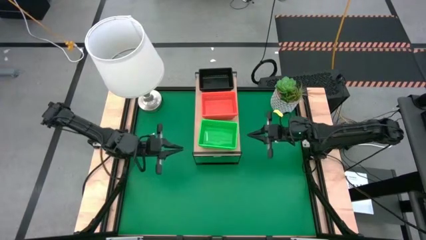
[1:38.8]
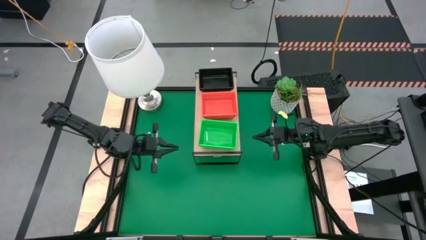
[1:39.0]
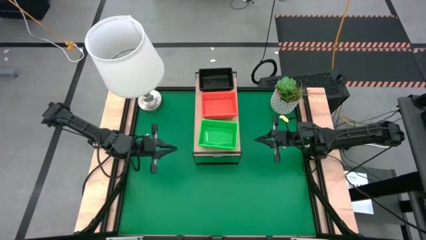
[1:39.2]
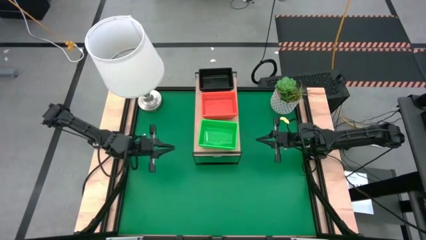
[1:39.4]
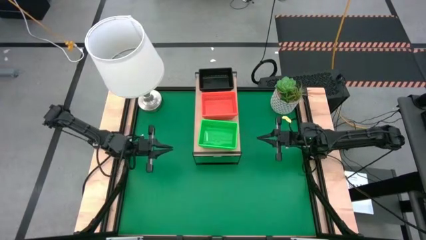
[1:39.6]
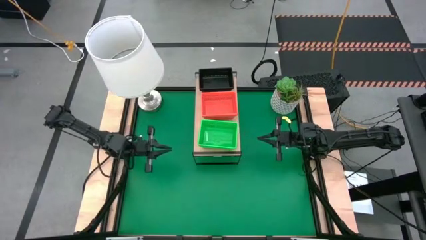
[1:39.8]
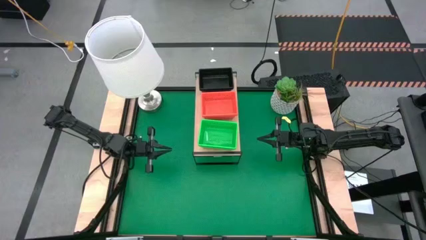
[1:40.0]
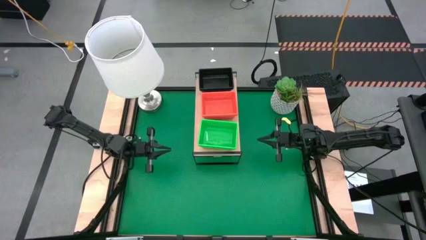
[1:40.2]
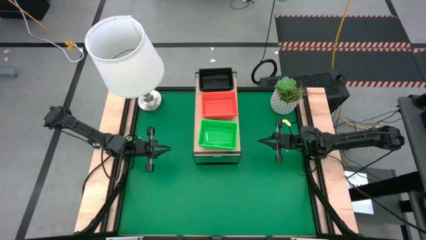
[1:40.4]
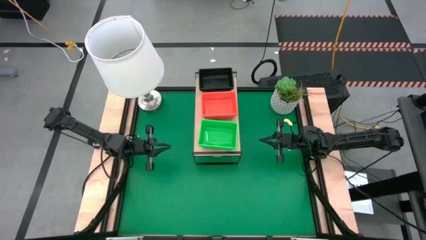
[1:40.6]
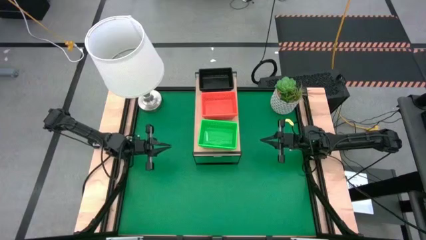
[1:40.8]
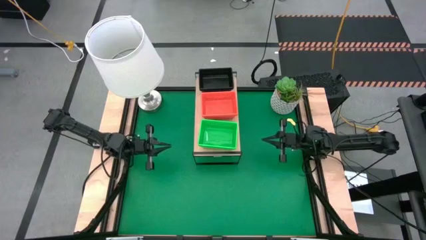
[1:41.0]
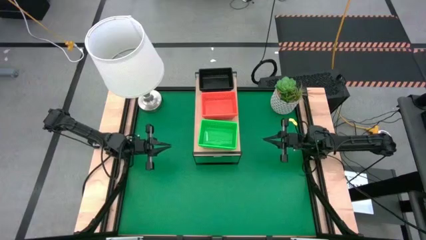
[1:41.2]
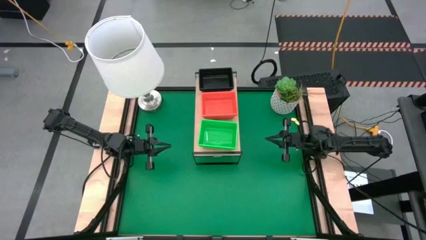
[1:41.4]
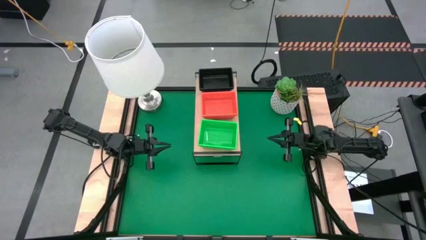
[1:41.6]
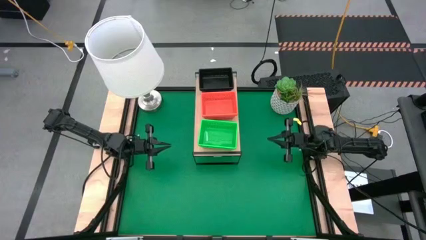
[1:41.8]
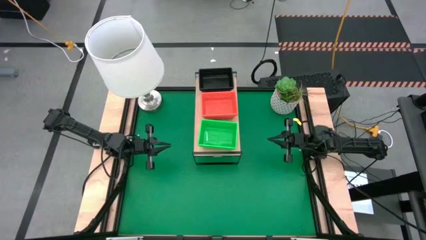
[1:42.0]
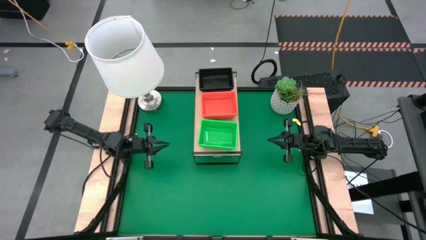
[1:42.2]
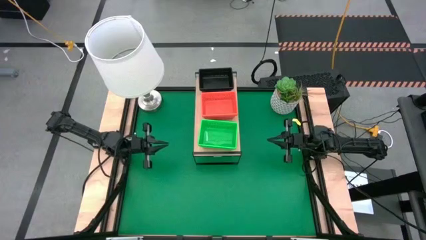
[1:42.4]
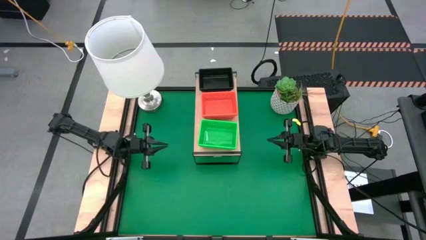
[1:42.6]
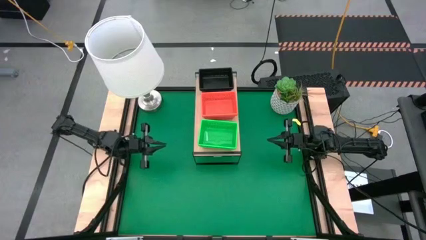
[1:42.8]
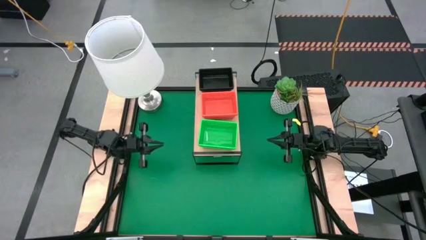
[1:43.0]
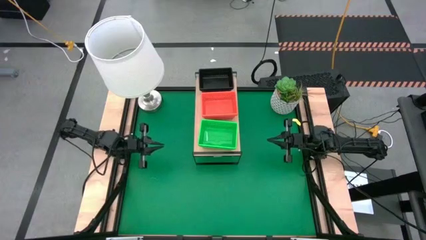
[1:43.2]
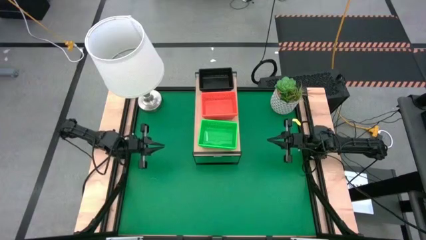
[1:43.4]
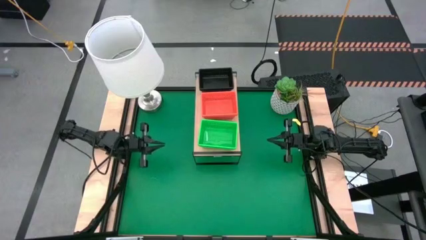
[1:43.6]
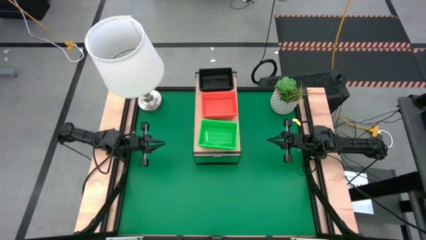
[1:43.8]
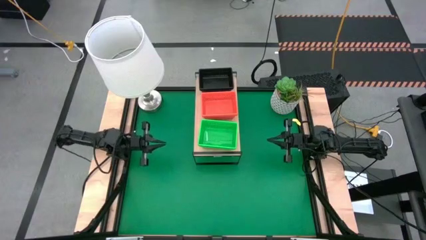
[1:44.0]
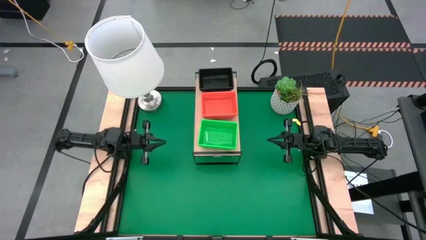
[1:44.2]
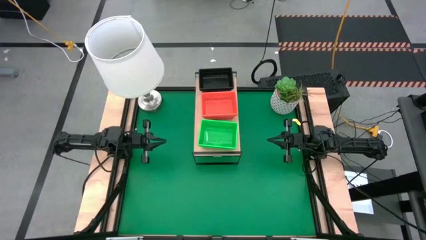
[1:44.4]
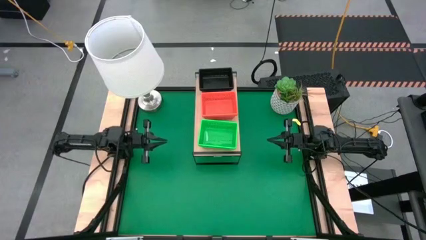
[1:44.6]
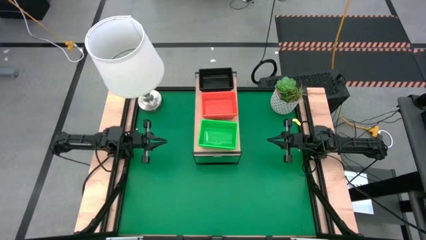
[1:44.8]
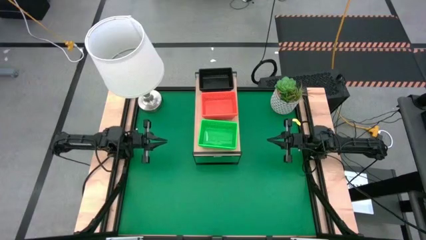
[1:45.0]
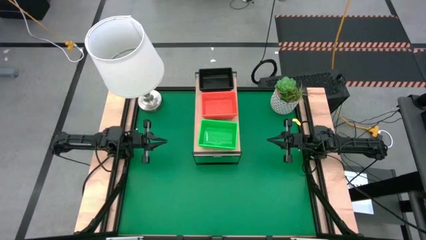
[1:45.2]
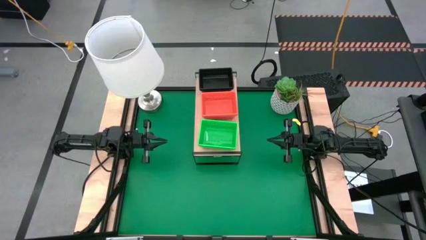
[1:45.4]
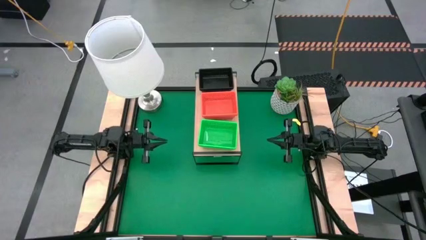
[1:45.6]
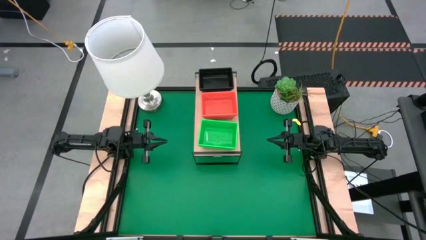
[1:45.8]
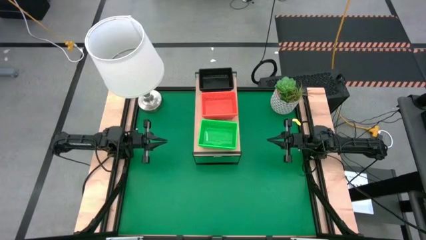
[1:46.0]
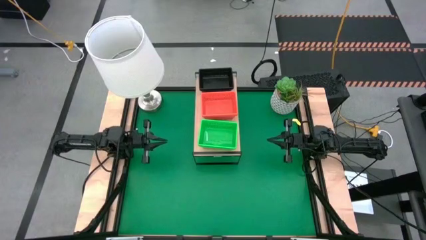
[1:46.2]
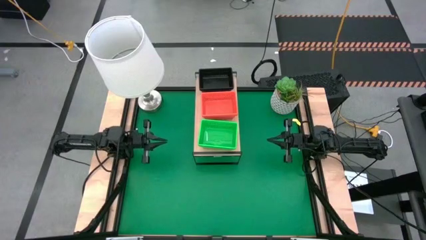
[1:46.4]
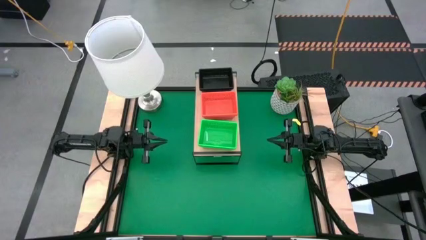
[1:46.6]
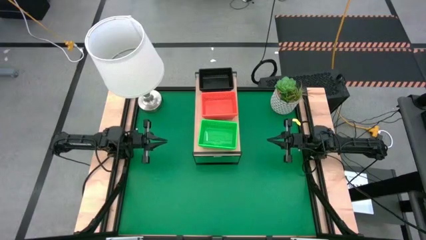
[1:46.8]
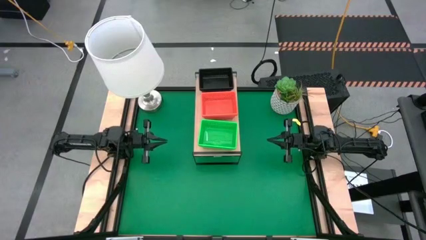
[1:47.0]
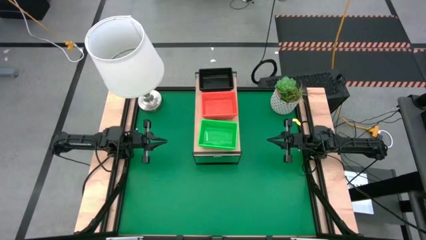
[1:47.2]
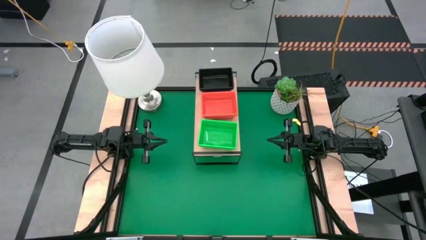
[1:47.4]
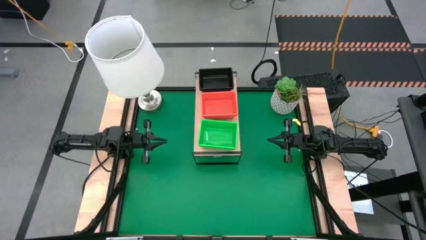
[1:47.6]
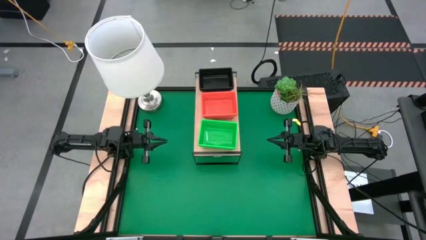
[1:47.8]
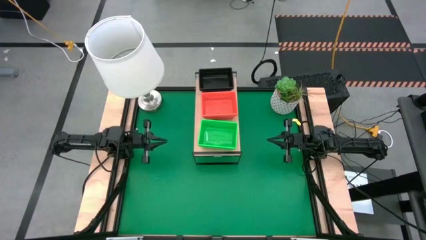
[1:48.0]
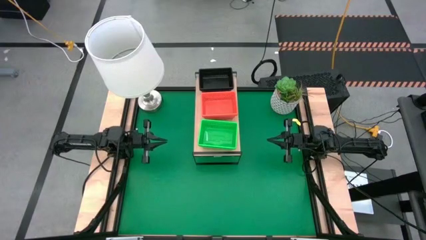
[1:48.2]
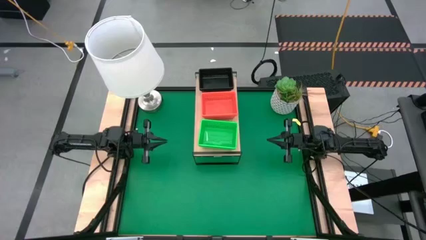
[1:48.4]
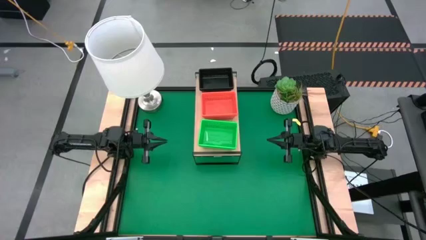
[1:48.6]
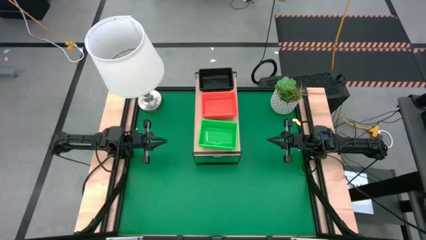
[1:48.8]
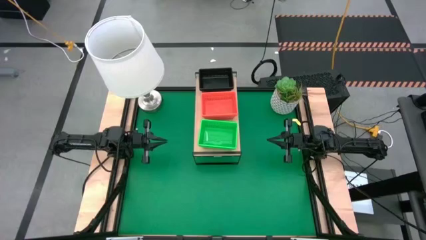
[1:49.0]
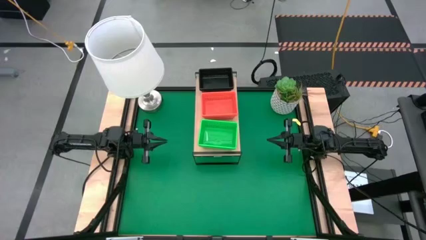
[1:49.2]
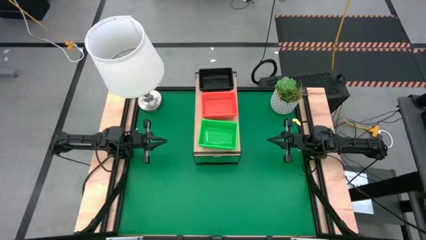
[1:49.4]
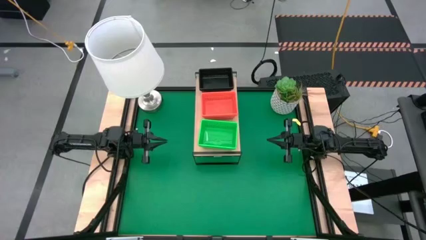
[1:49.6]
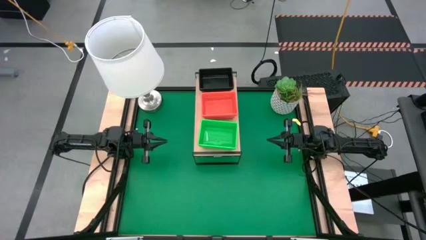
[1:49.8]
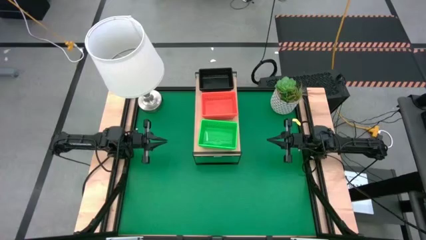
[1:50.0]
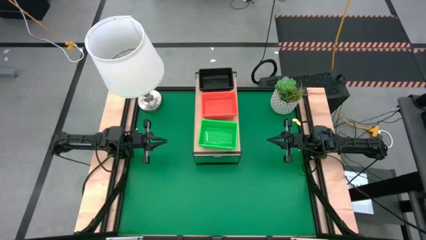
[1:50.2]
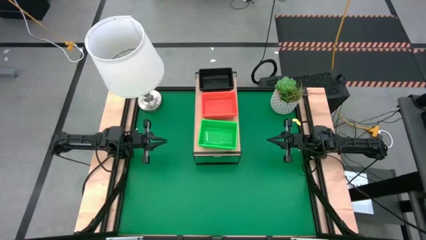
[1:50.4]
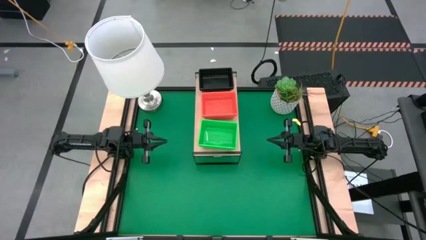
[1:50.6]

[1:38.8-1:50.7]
Task: Stack baskets on shelf by color
Return to Home Position

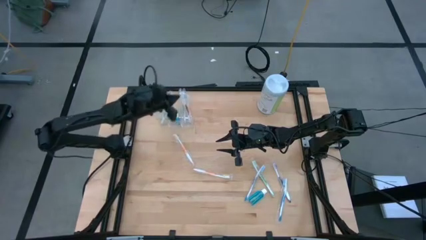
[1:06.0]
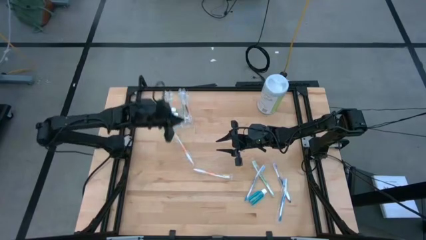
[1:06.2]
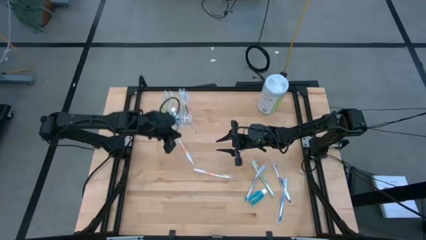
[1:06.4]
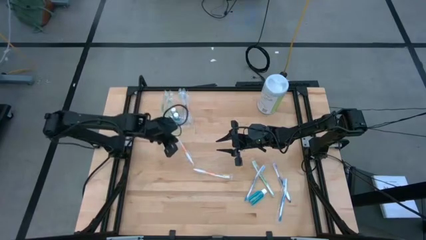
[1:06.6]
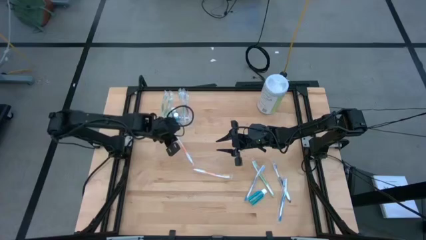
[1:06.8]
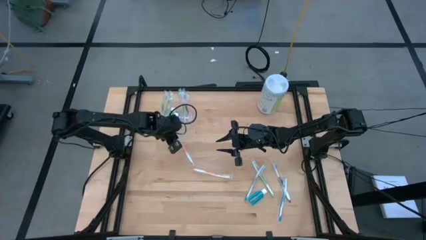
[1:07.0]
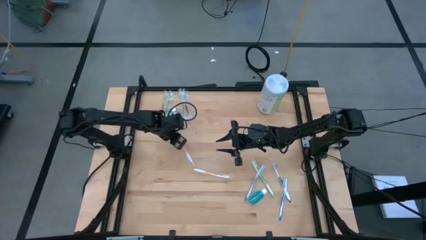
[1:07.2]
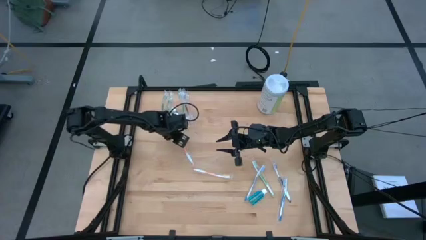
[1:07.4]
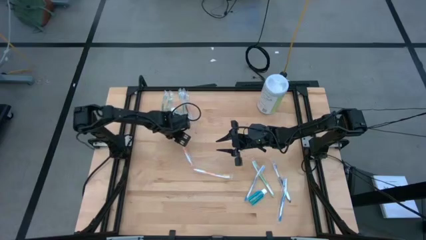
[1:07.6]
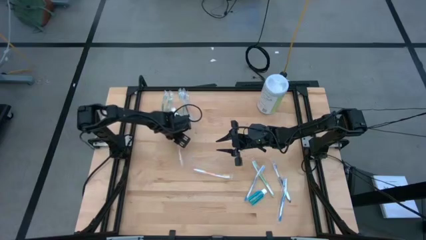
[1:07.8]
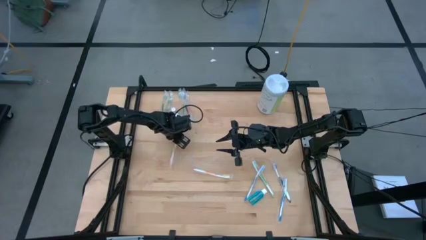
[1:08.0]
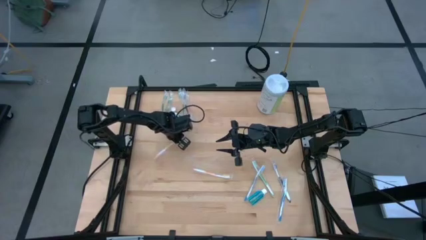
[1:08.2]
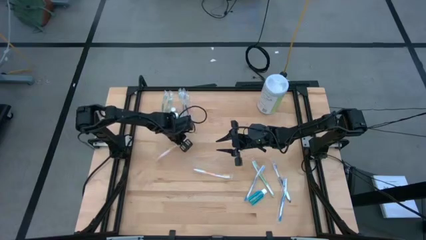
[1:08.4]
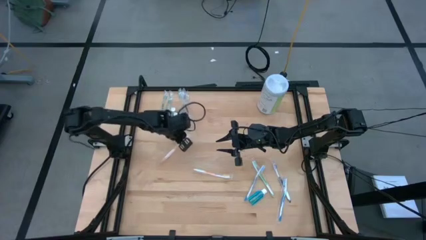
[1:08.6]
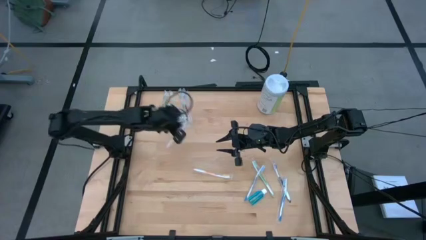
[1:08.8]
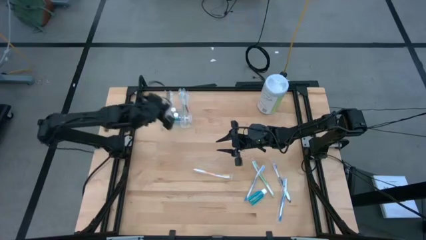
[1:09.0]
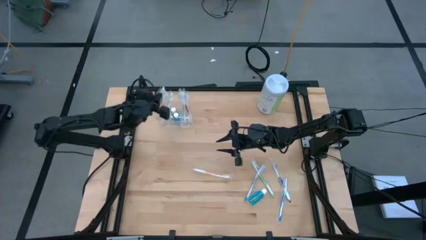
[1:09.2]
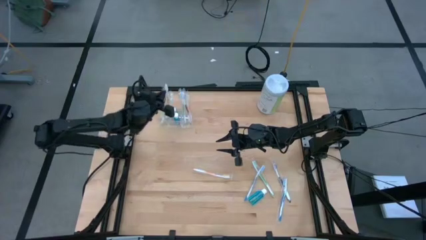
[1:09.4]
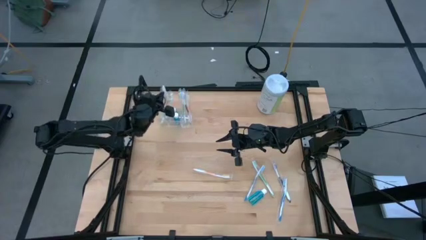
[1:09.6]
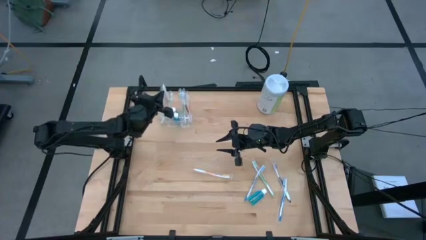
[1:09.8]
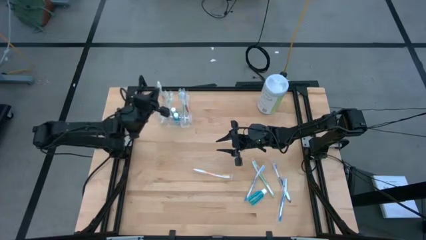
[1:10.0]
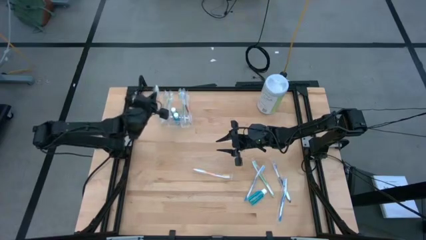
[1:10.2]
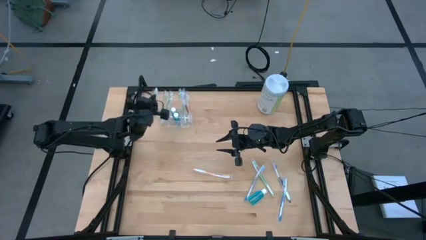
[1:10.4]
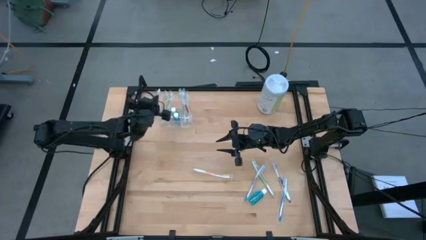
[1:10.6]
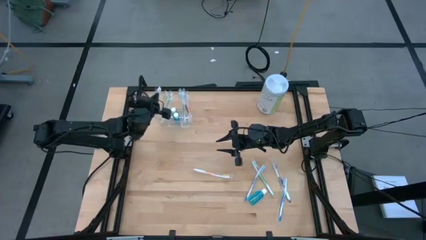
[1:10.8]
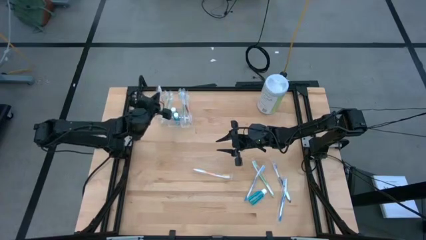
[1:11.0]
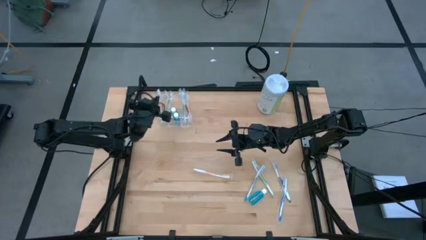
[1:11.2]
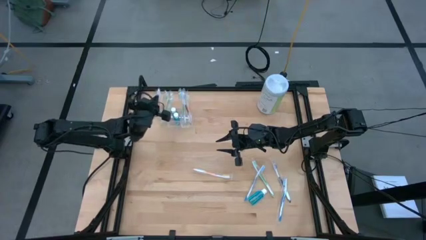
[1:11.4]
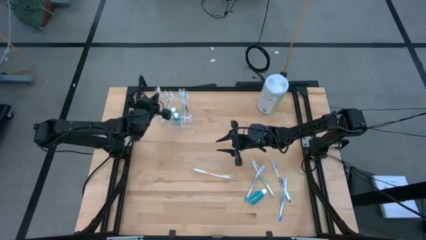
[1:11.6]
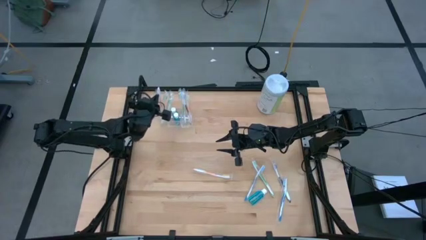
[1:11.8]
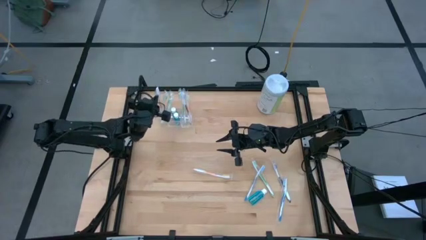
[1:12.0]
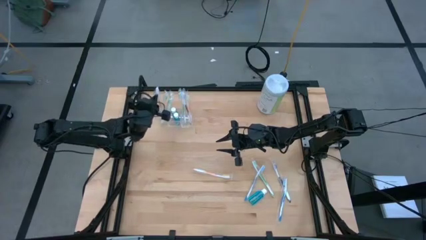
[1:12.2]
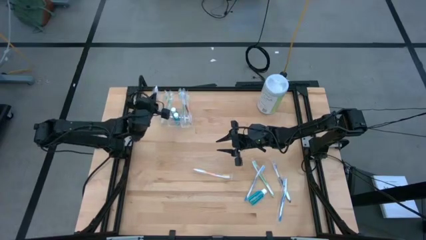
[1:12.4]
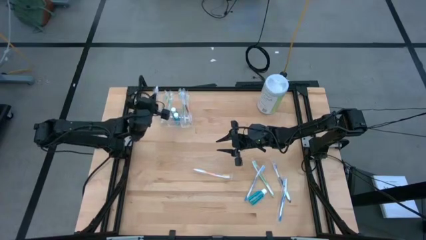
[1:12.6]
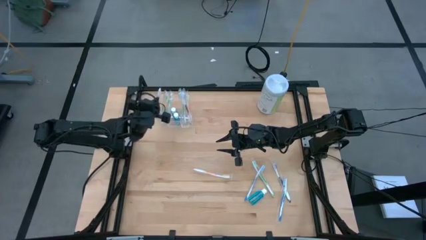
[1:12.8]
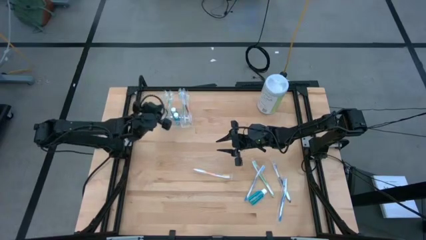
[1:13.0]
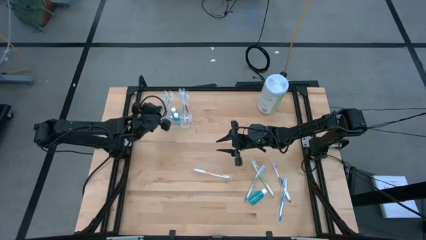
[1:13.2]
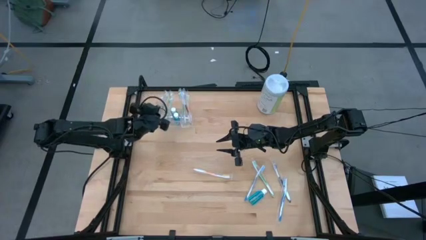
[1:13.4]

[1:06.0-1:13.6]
Task: Pick & Place toothbrushing station
Put the orange toothbrush into the transparent organizer
